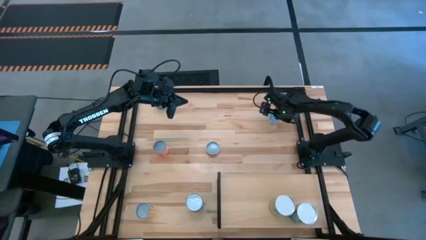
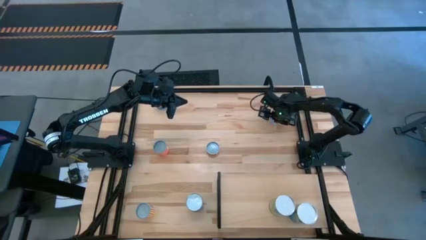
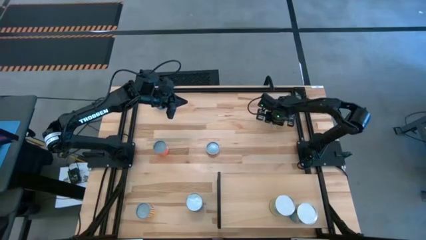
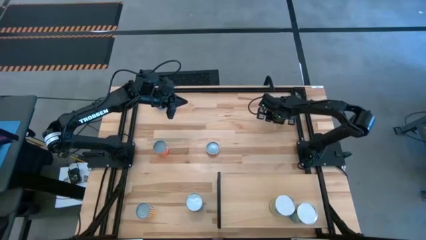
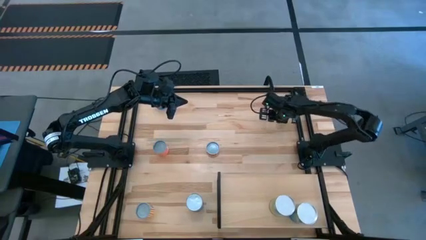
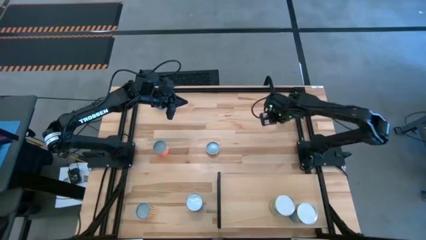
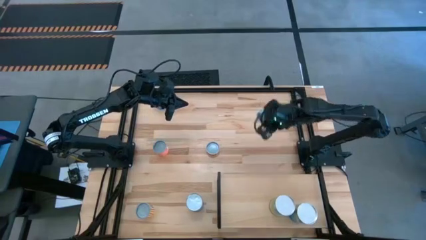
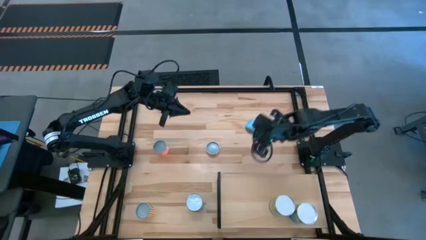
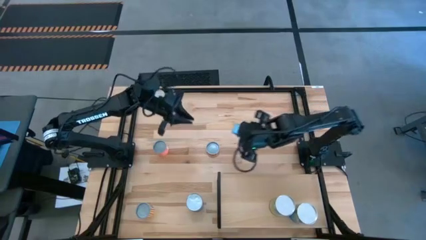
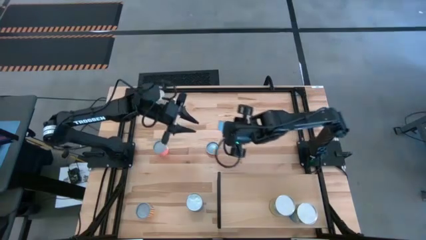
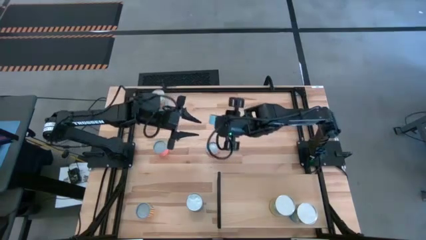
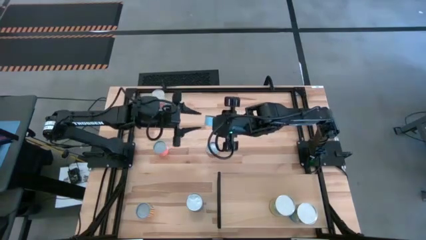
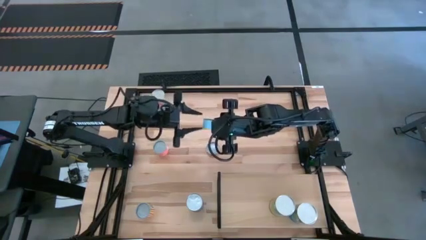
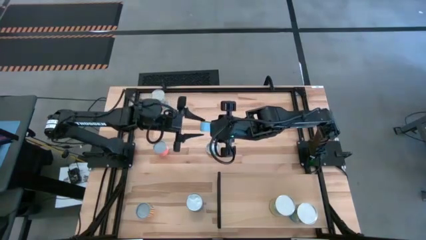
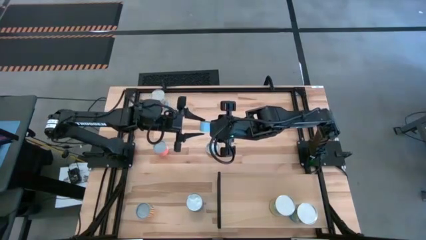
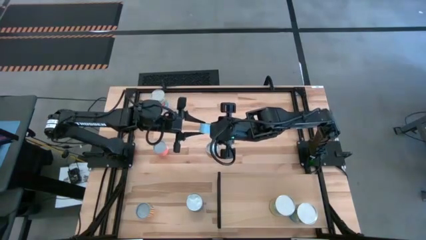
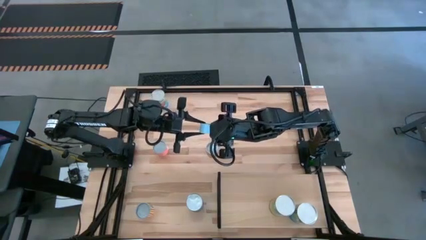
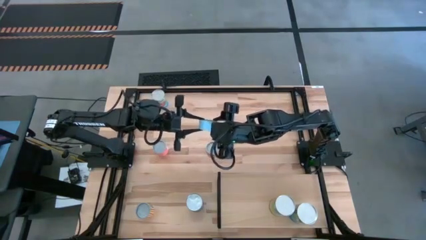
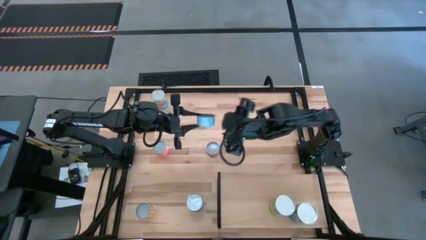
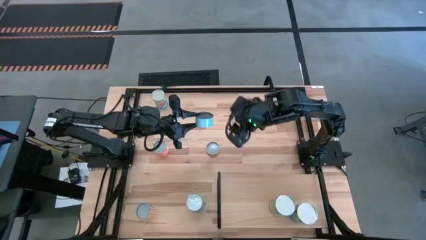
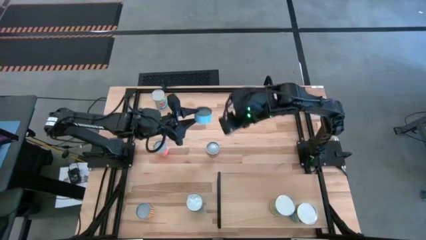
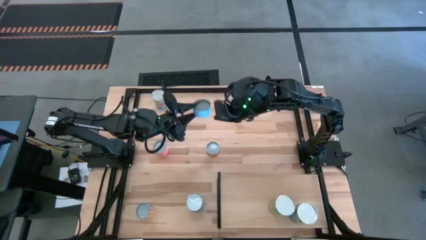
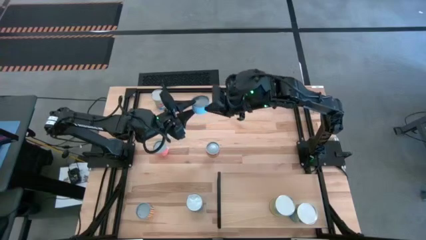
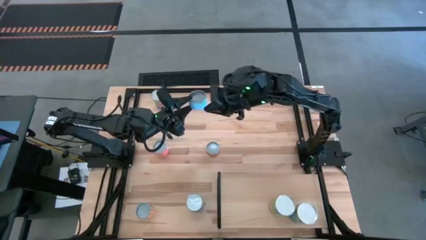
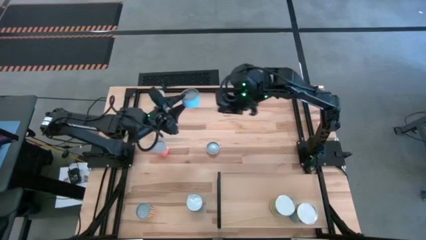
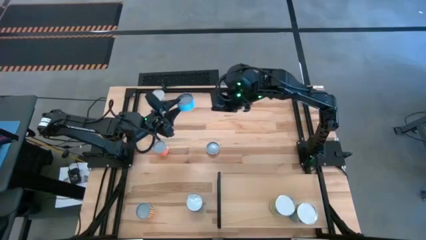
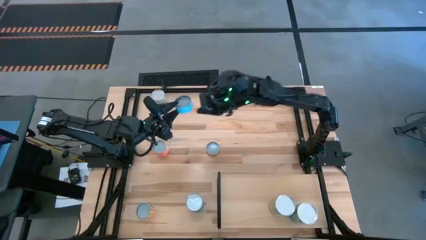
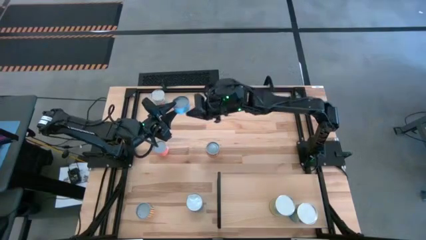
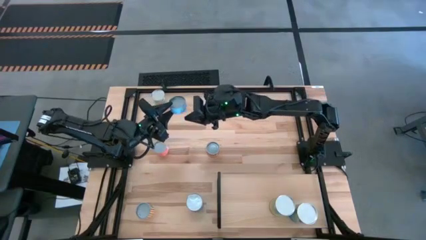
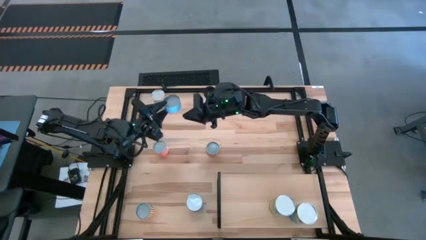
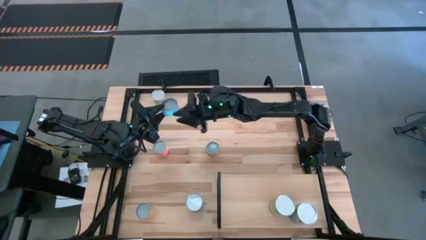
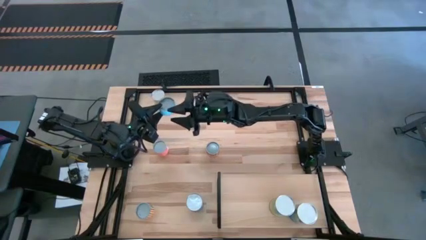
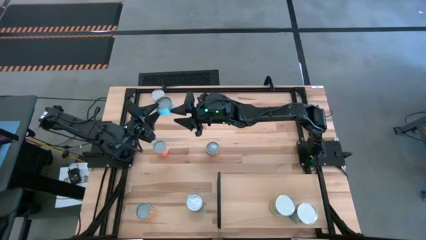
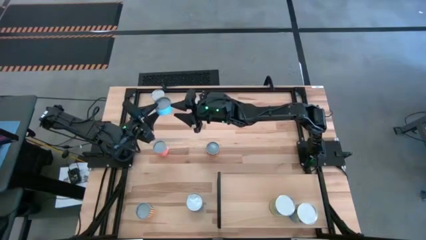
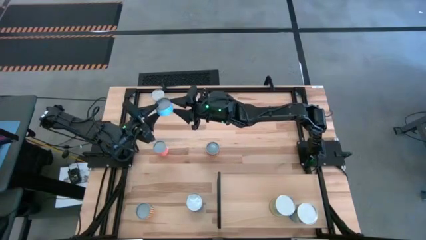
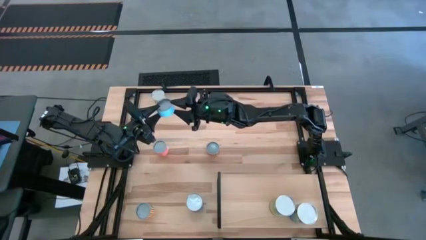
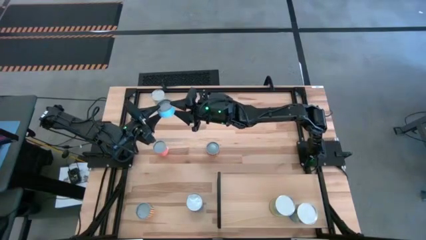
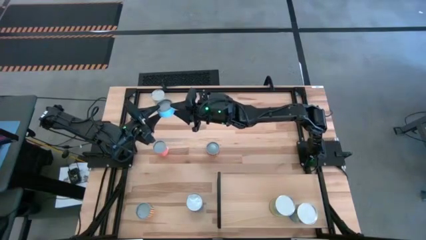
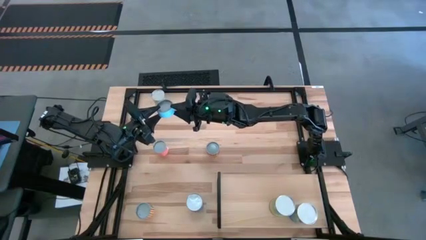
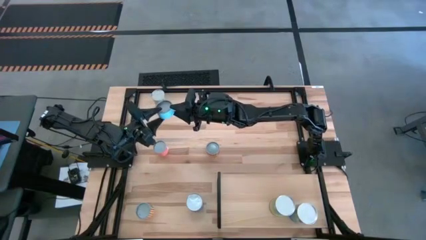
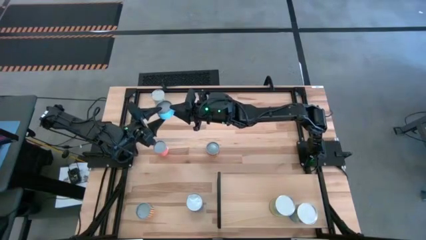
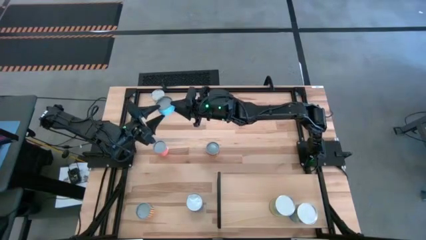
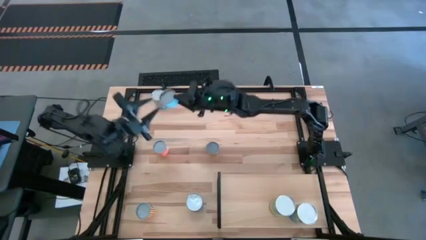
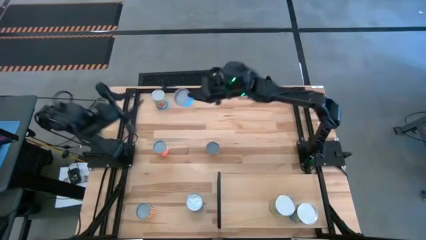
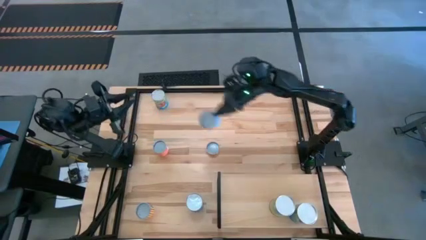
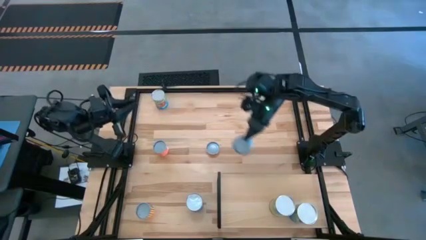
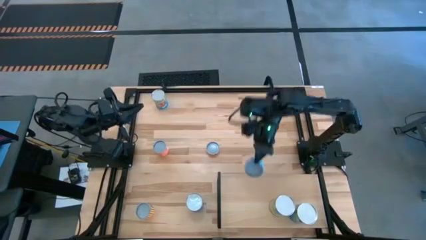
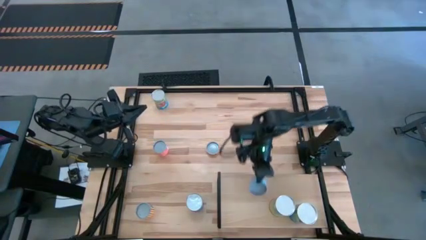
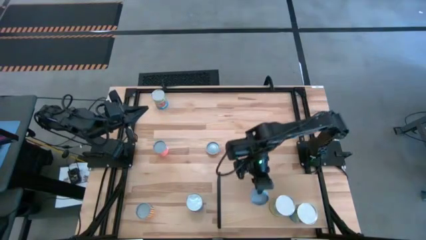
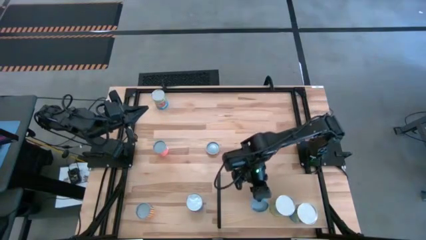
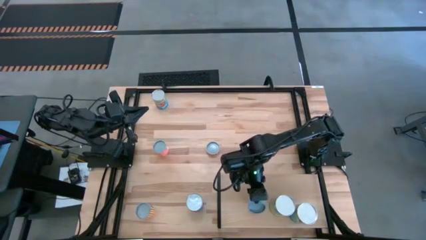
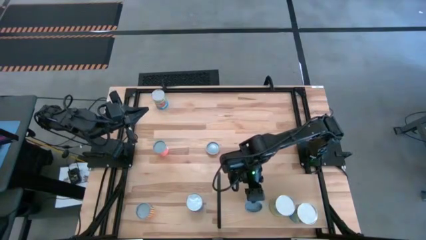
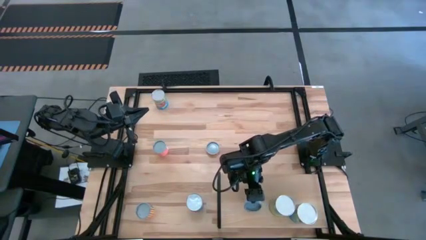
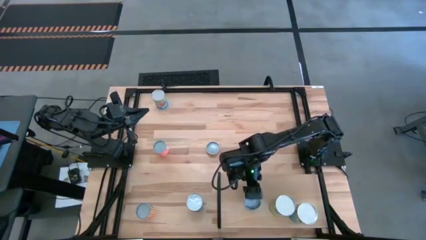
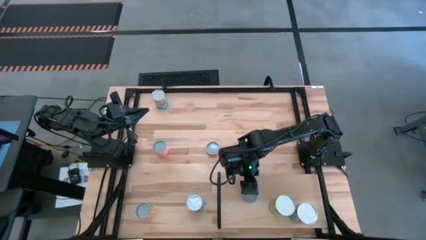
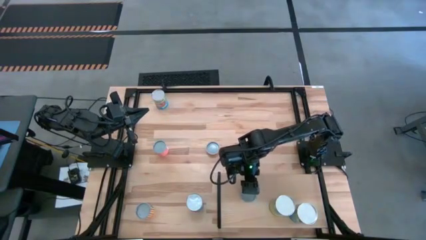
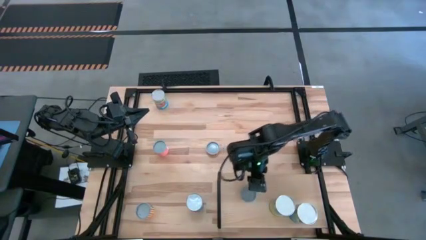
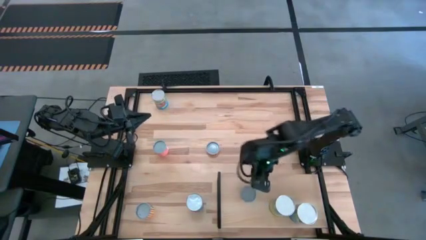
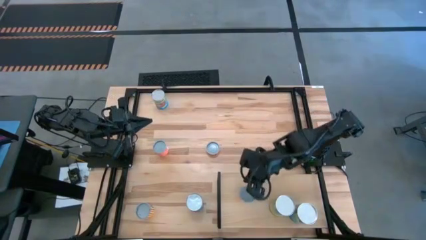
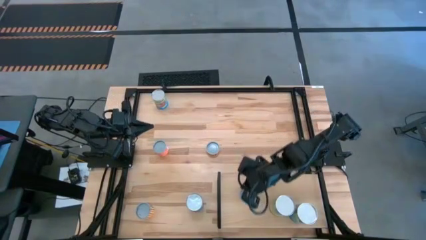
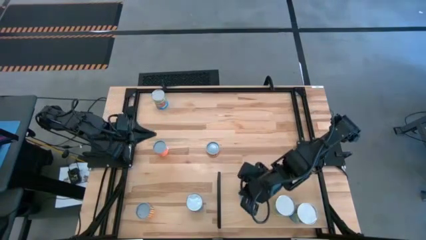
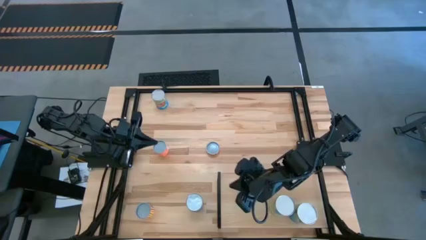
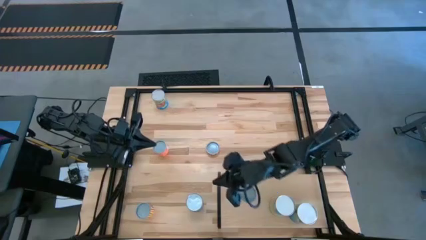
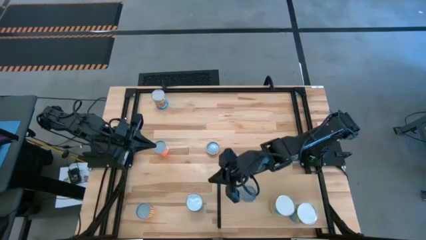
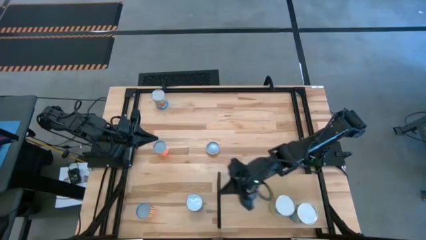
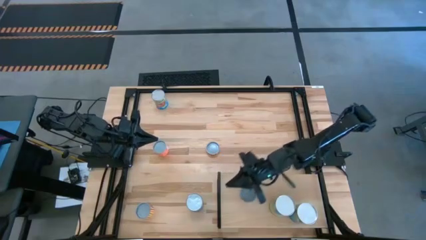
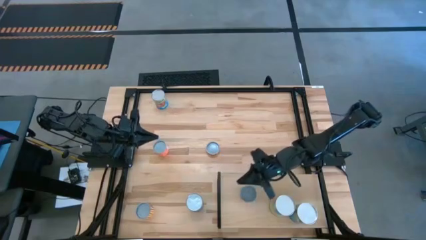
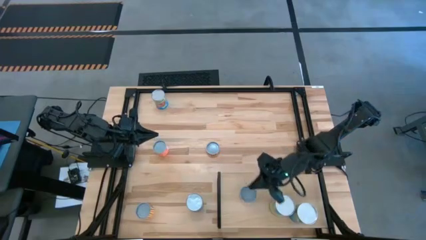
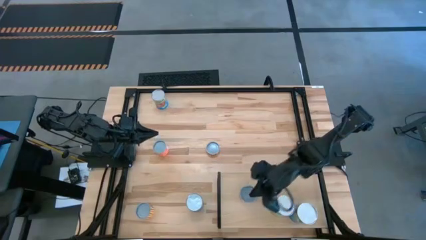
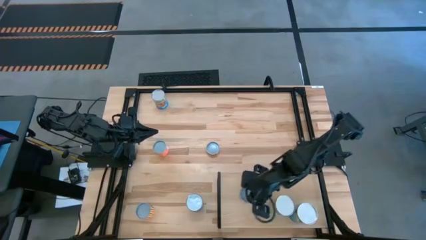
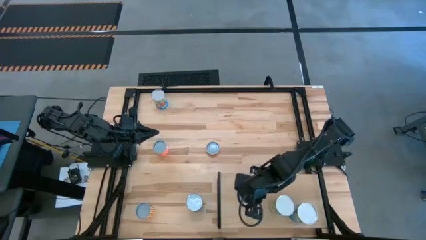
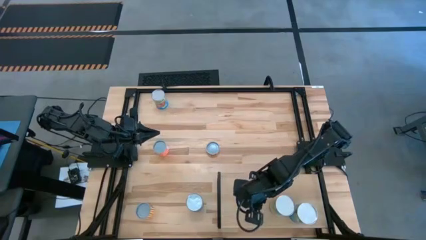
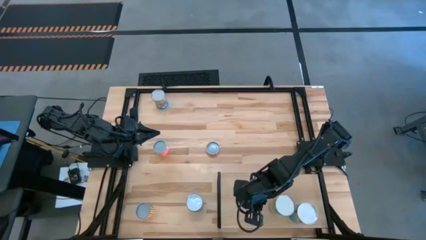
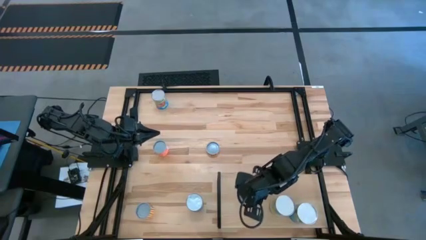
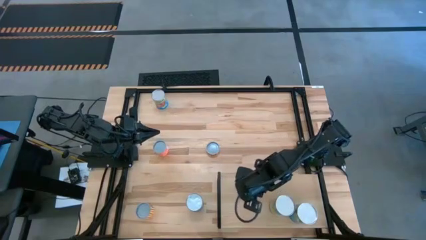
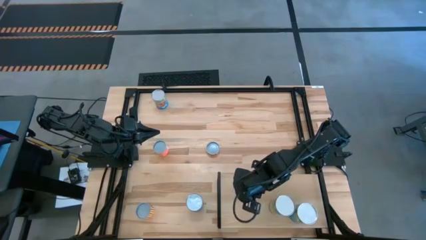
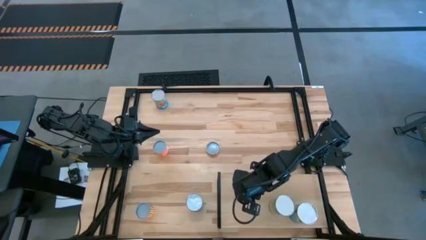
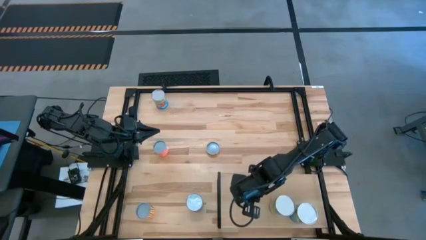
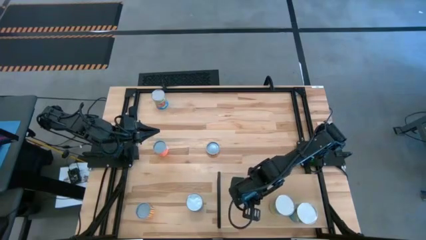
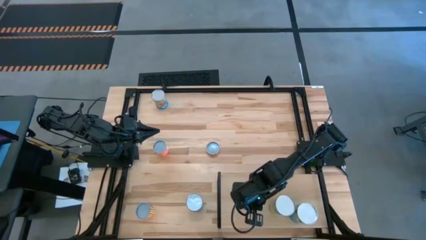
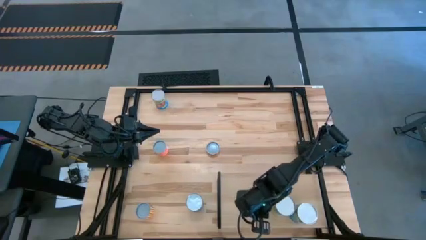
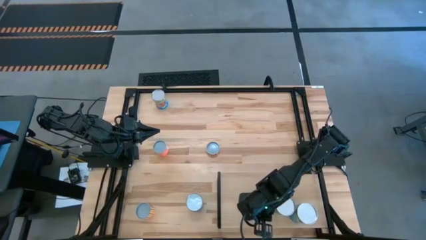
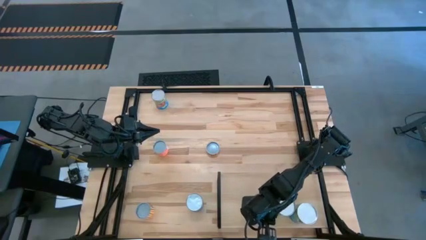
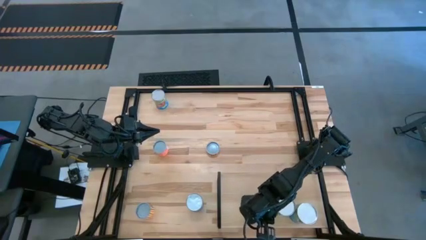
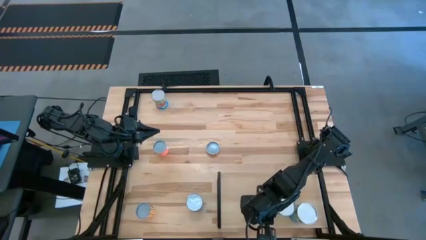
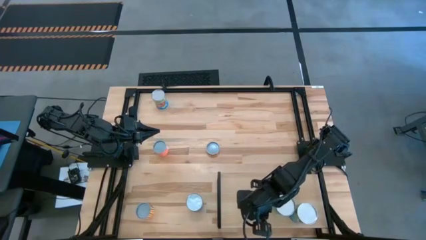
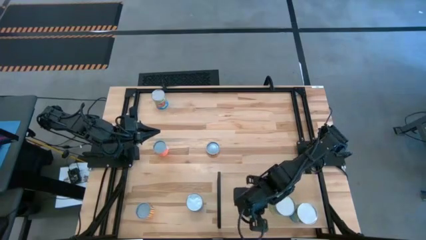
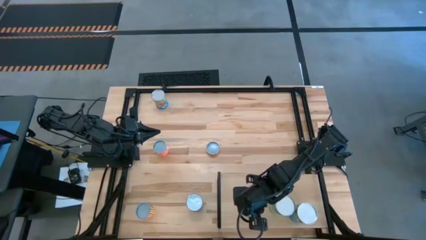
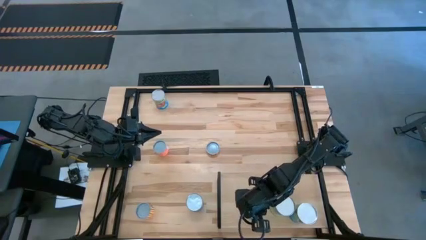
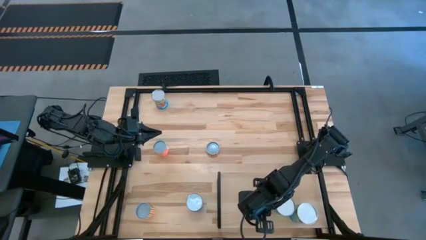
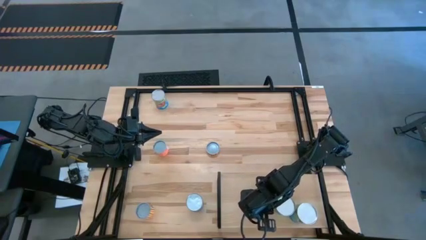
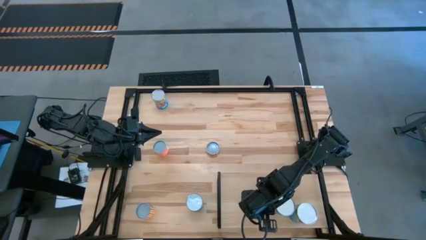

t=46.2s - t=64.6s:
Task: Pick and place cans onto a shelf
Put the canned tuna on the shelf
